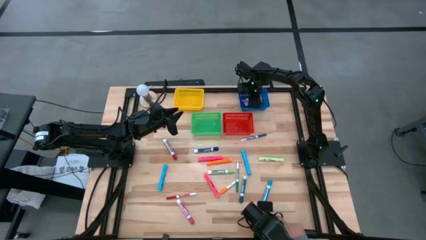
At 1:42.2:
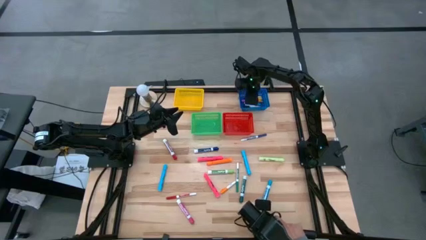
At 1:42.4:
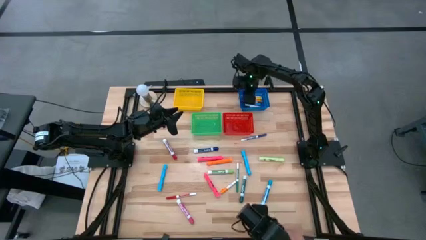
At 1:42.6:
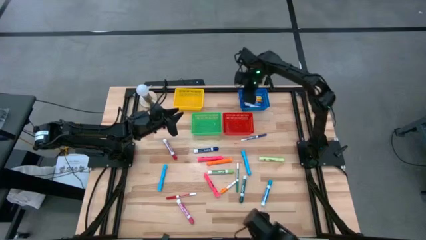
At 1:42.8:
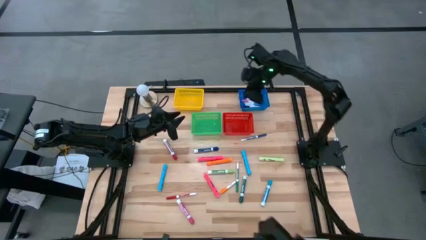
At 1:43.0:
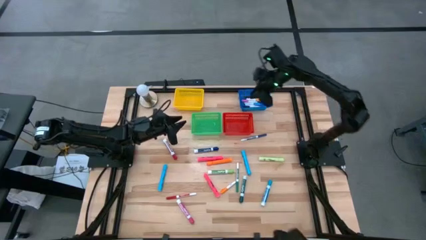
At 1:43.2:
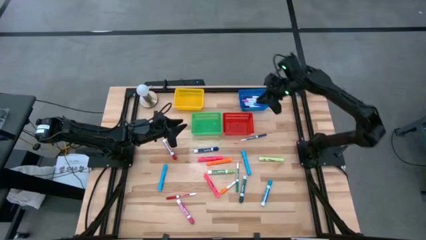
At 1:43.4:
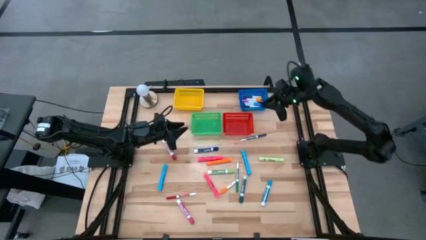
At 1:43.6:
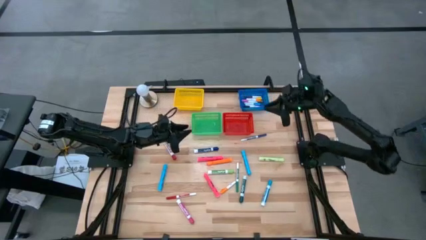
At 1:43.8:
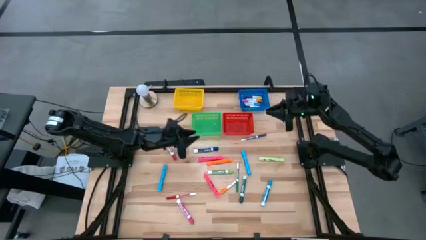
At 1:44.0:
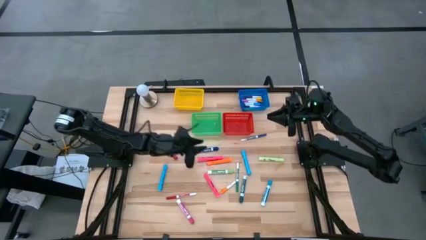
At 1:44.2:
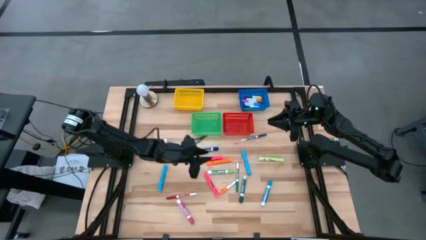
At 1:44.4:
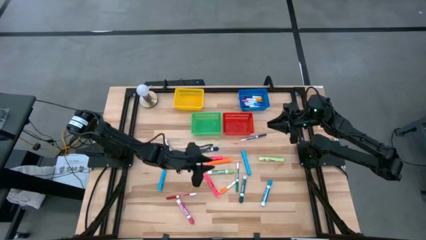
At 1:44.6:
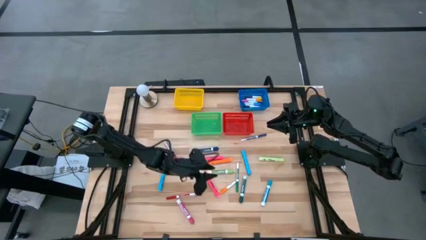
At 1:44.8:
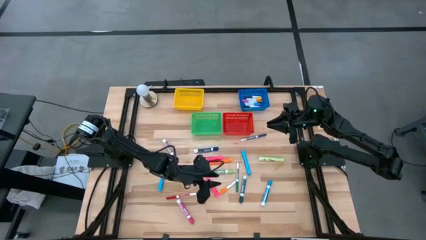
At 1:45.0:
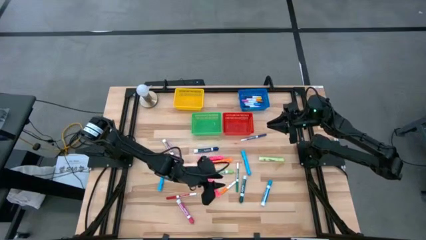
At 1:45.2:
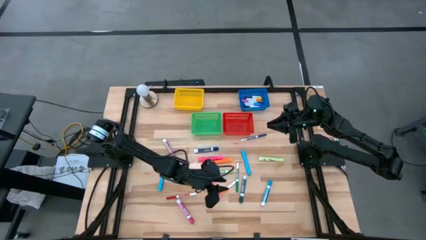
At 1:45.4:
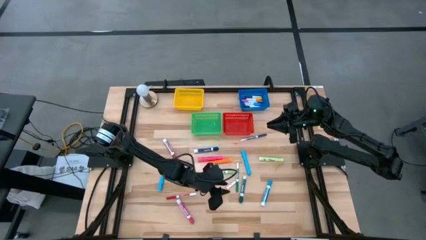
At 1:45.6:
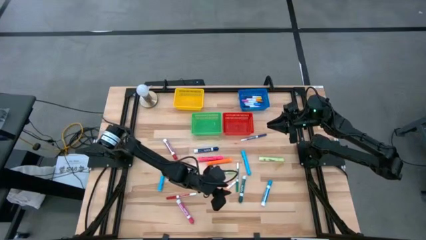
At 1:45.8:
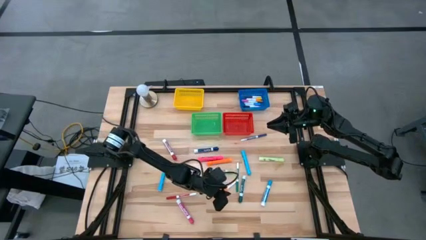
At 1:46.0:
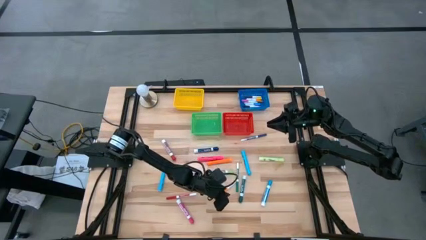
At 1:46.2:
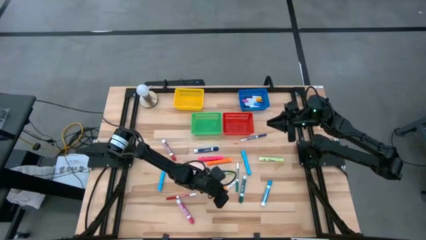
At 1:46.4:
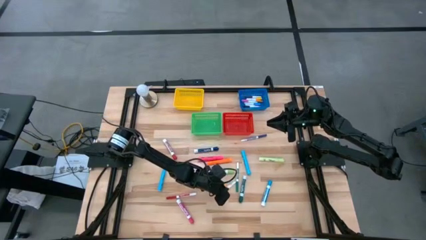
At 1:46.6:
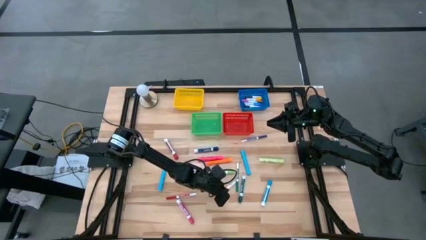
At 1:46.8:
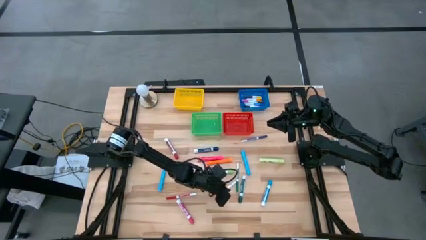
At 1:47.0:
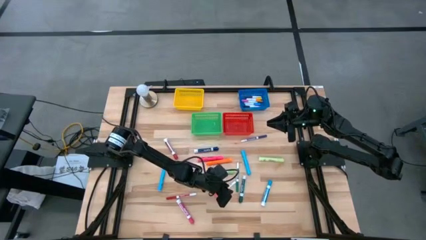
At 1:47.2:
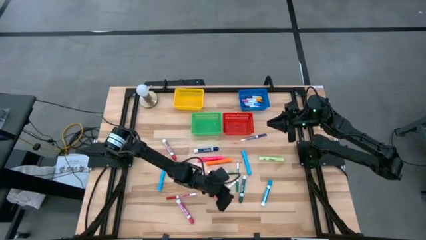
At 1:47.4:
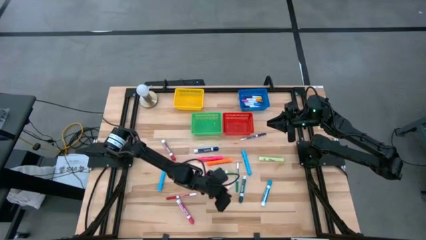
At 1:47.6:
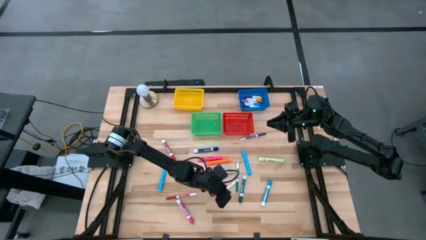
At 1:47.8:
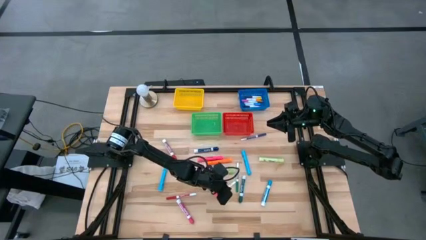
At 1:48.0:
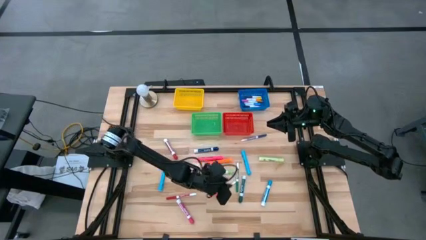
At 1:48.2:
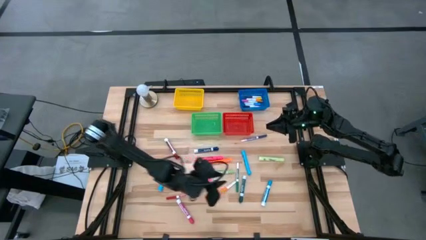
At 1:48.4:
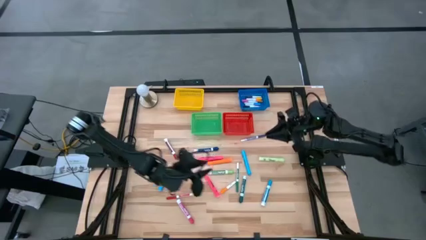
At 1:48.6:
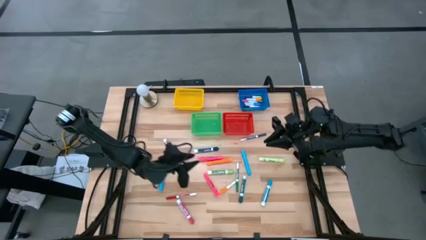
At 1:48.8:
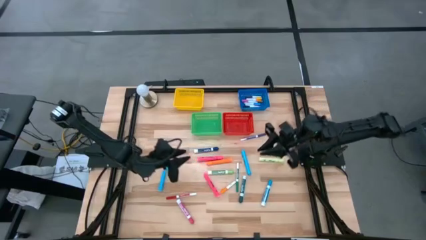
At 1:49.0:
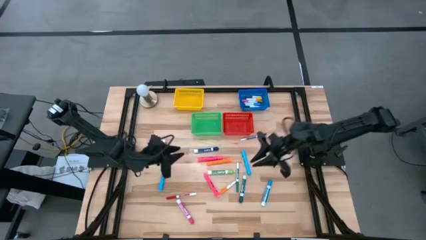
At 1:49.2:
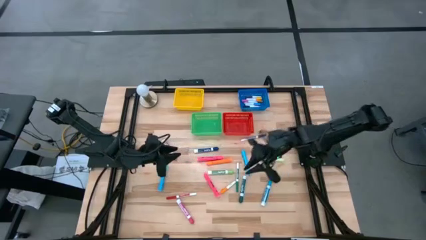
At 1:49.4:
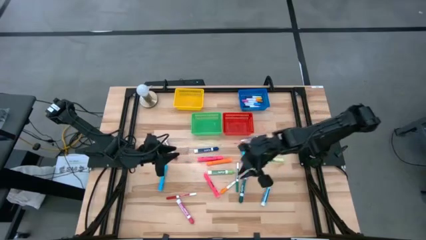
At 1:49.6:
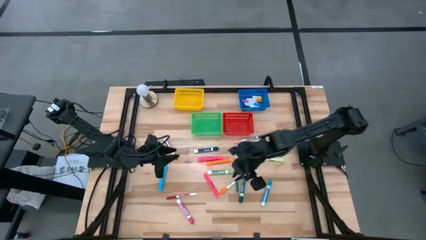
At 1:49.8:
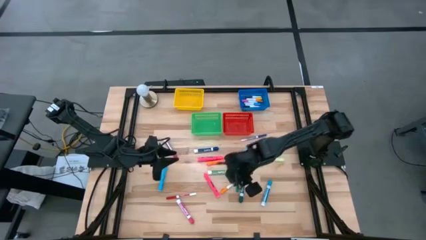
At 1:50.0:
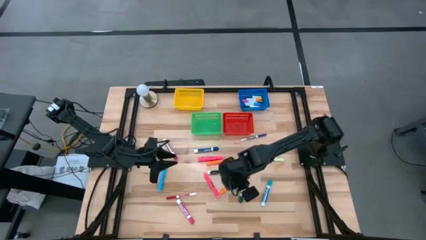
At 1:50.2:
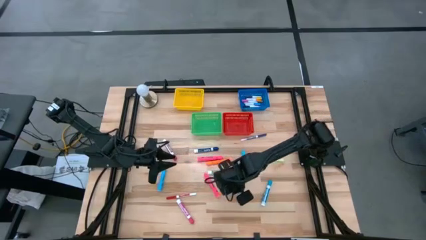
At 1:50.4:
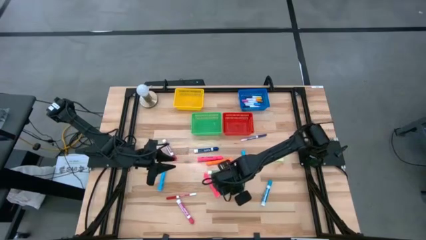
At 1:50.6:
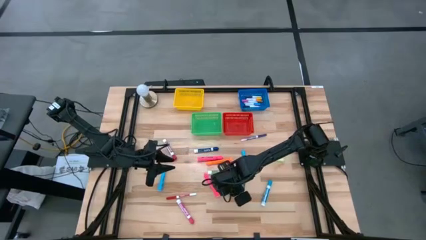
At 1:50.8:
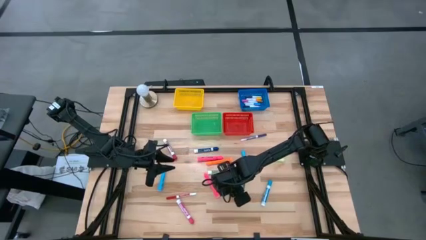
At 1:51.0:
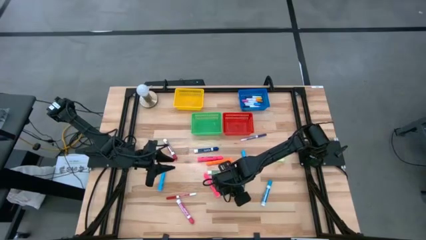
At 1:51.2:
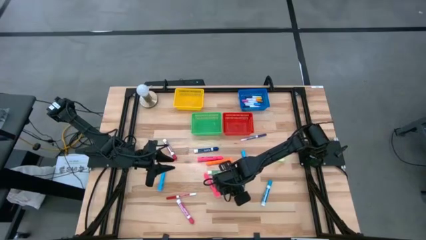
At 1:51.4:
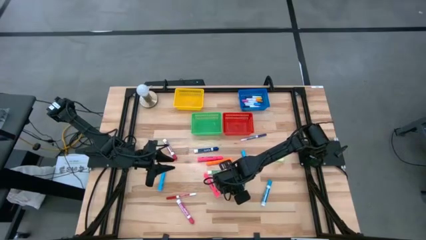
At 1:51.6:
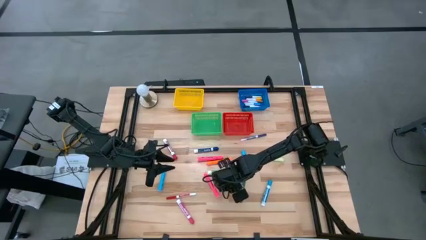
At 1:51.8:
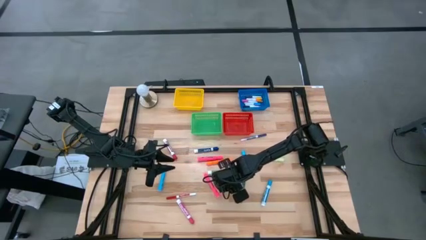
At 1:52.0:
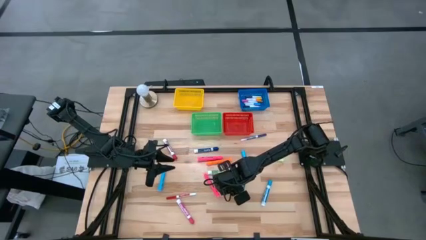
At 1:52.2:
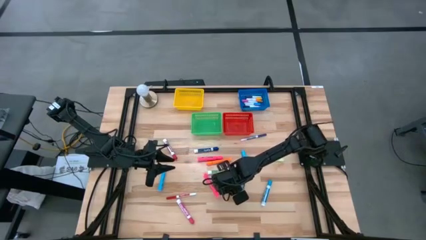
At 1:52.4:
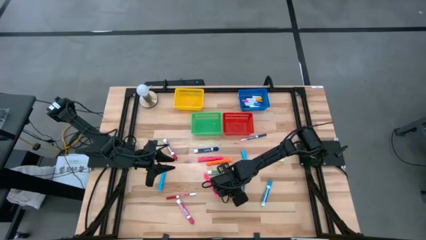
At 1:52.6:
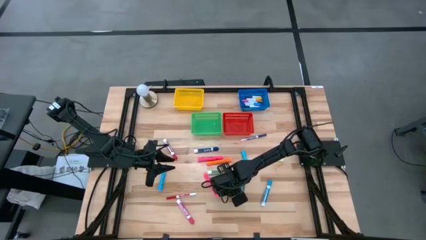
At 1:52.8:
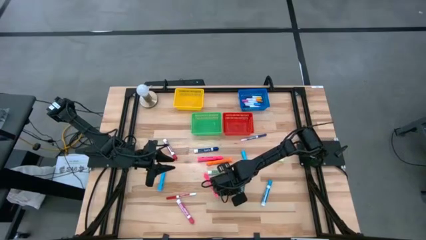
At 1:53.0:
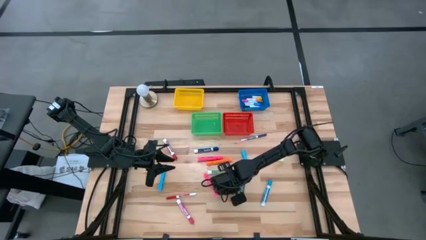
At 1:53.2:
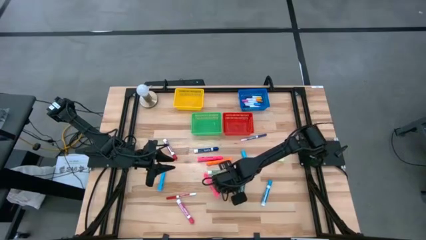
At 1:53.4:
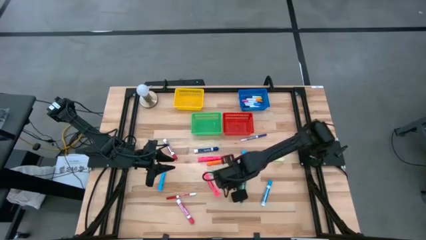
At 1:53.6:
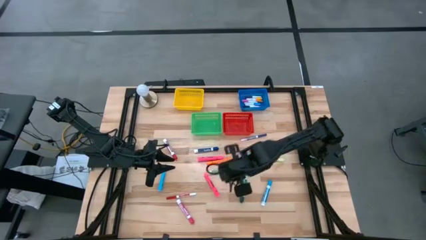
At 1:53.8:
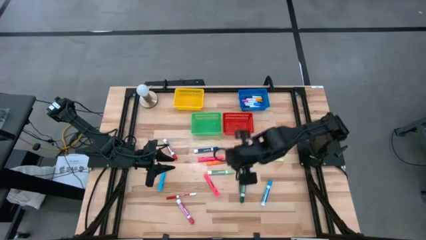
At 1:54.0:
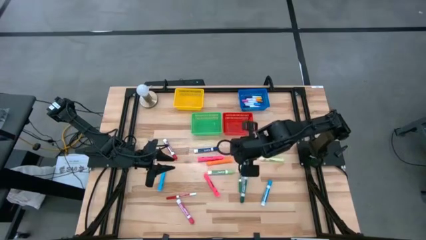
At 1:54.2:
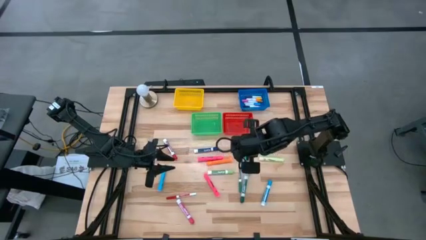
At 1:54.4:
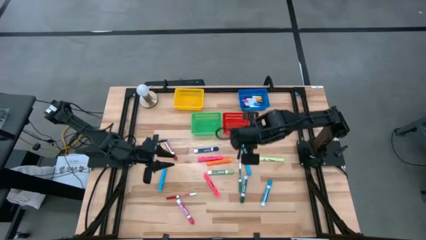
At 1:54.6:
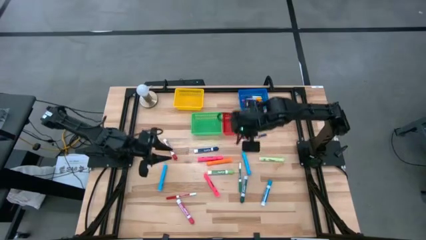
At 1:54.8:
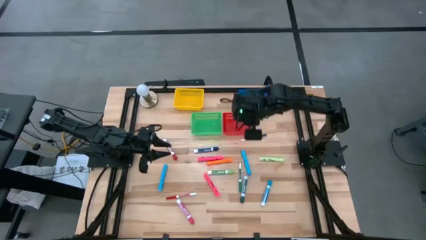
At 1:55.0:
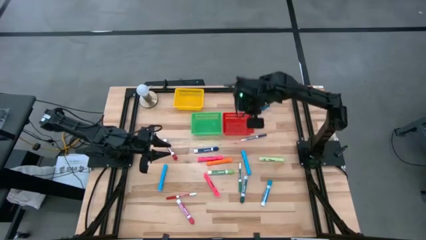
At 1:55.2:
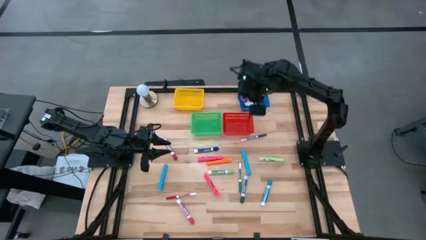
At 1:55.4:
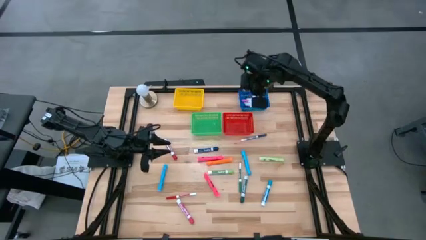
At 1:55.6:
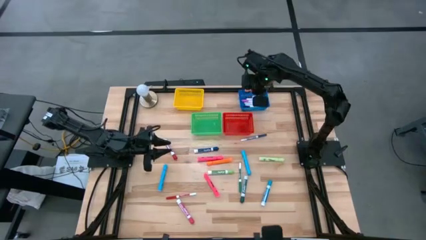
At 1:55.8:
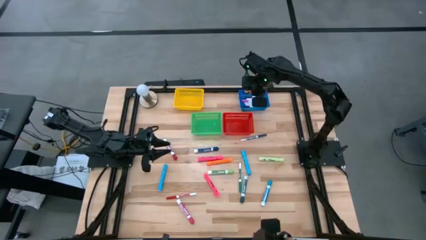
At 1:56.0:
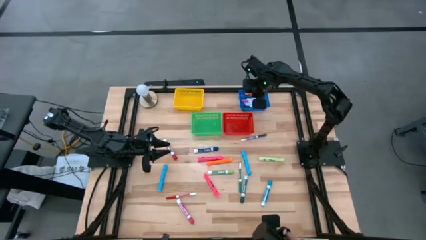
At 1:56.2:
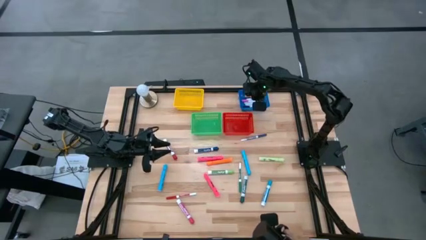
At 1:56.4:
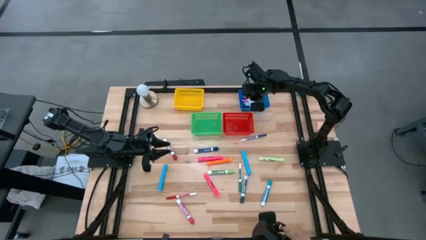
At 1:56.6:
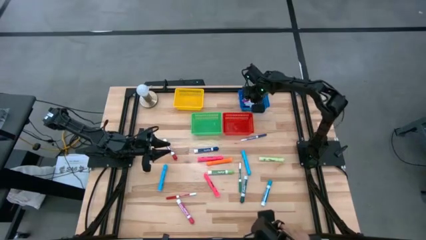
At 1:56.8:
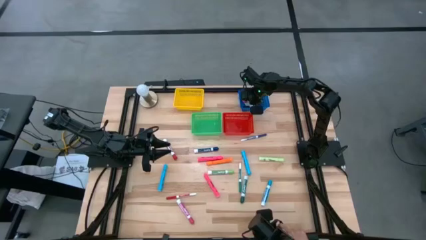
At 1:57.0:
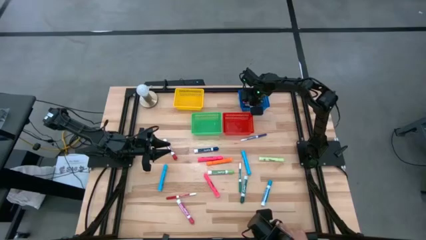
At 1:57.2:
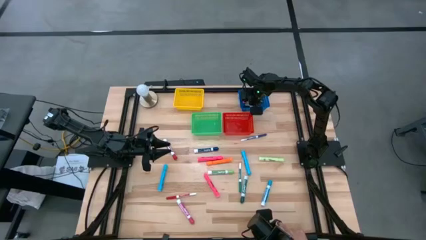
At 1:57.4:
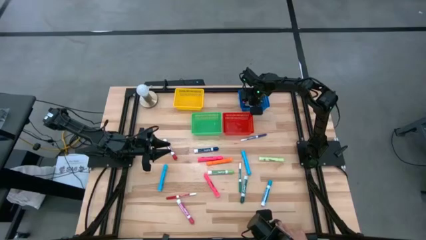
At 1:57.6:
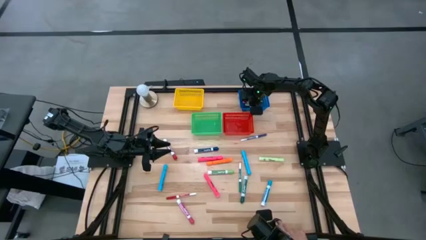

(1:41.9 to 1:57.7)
Task: Pick & Place Markers
Put the orange highlighter into the blue bin
